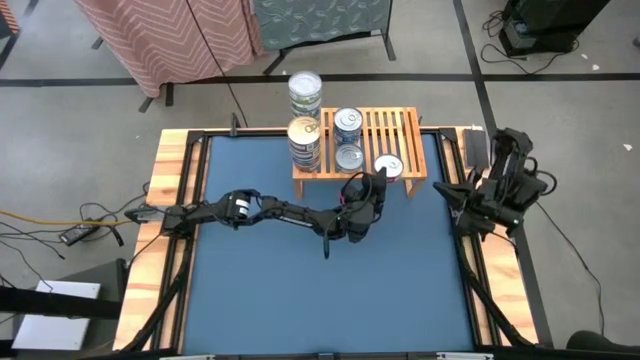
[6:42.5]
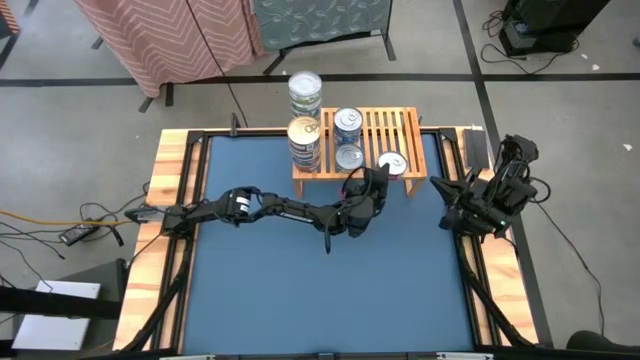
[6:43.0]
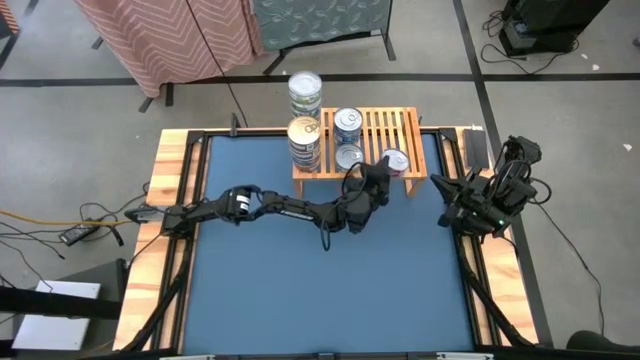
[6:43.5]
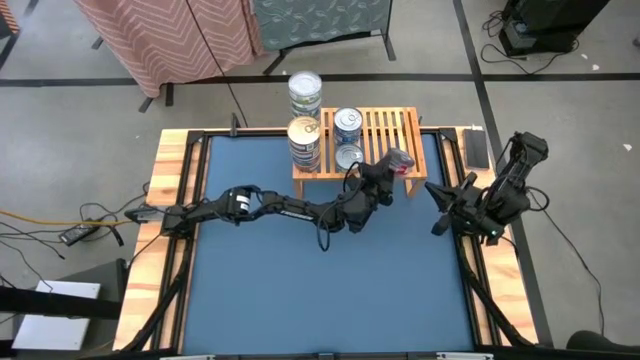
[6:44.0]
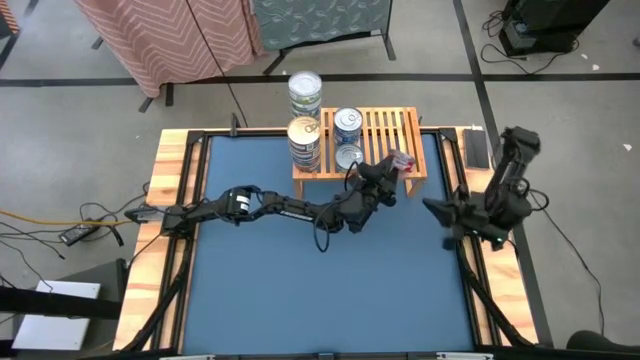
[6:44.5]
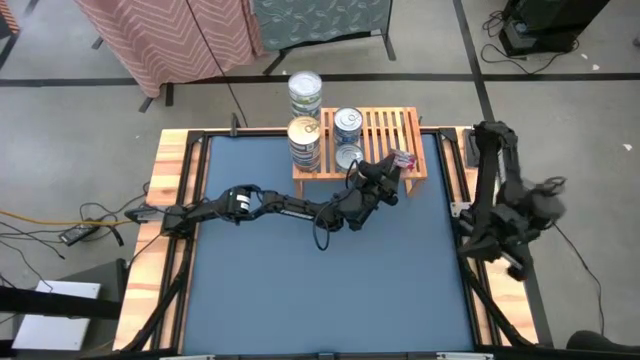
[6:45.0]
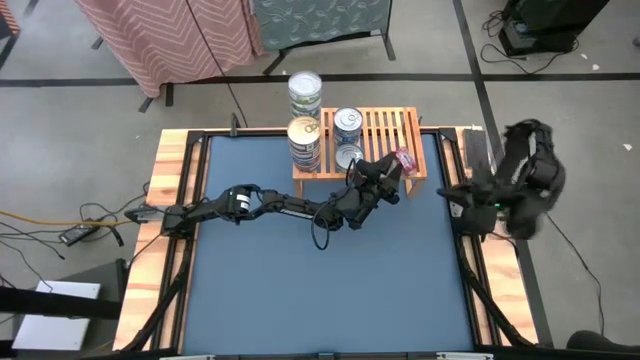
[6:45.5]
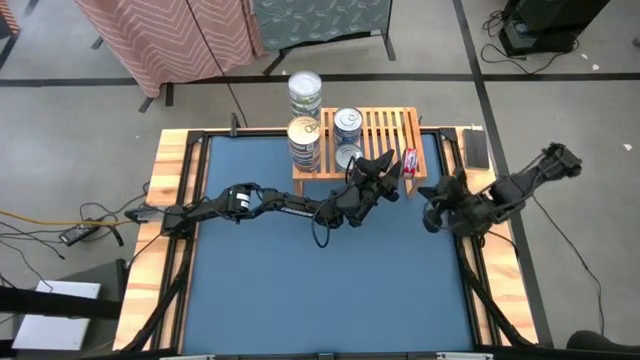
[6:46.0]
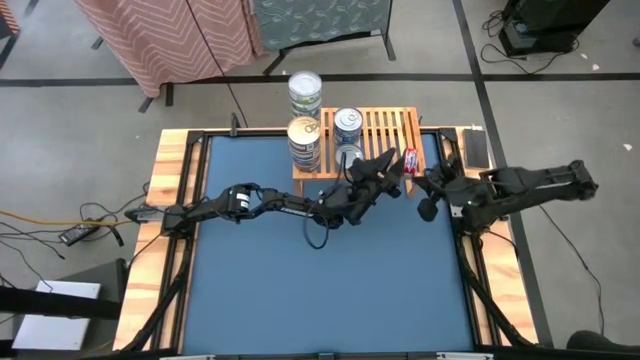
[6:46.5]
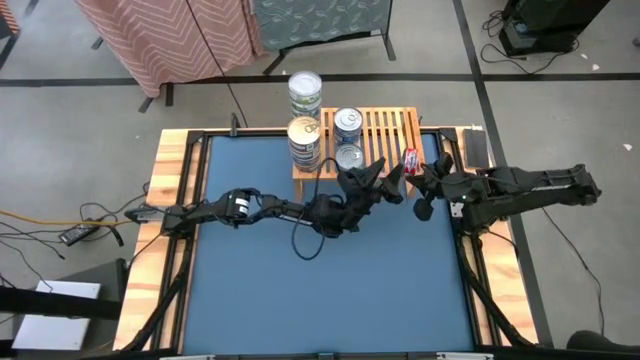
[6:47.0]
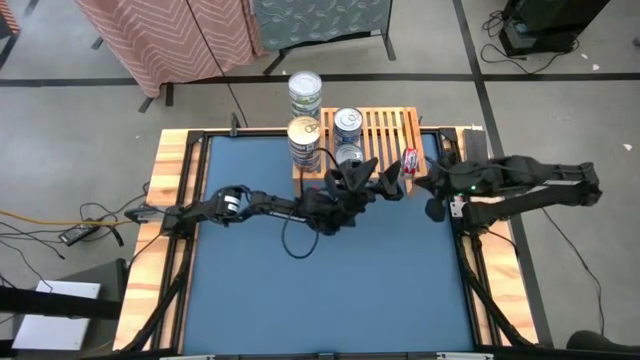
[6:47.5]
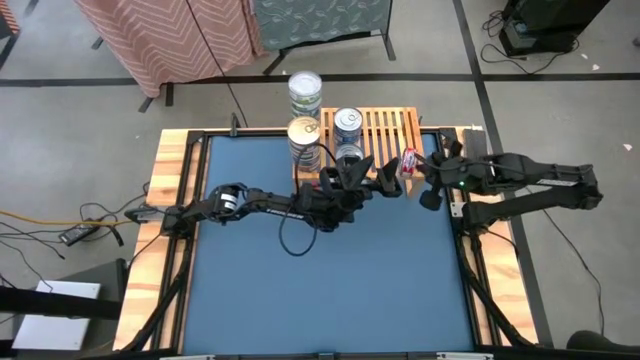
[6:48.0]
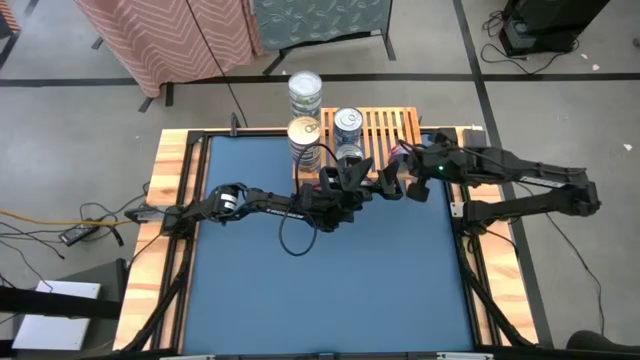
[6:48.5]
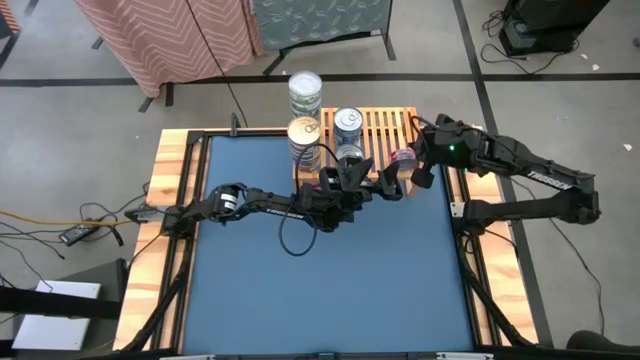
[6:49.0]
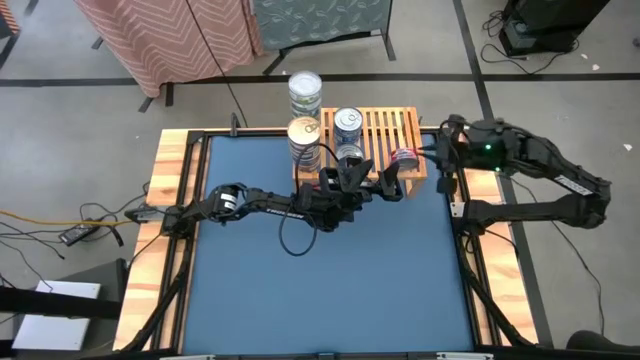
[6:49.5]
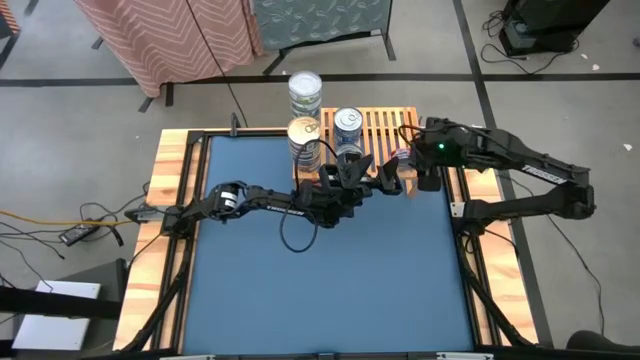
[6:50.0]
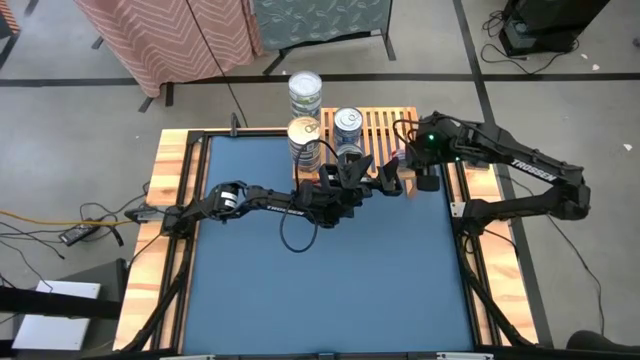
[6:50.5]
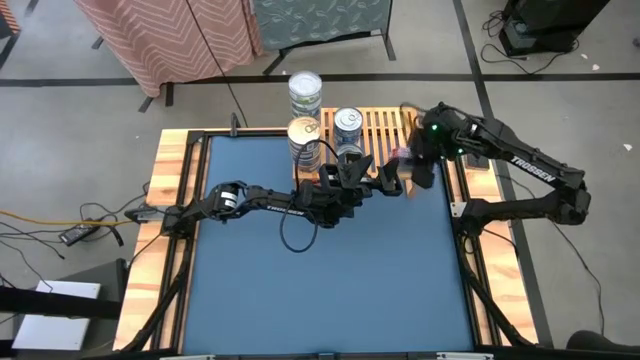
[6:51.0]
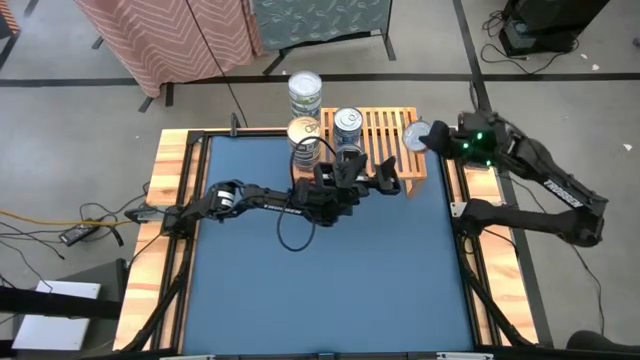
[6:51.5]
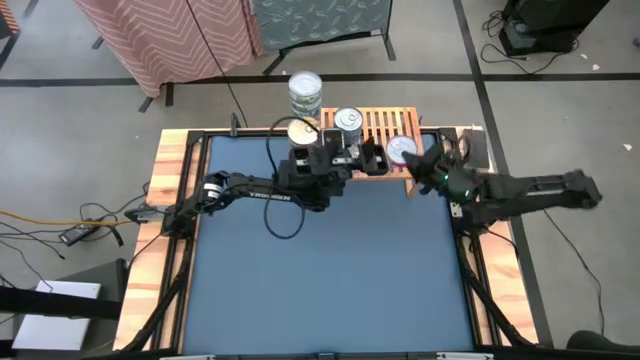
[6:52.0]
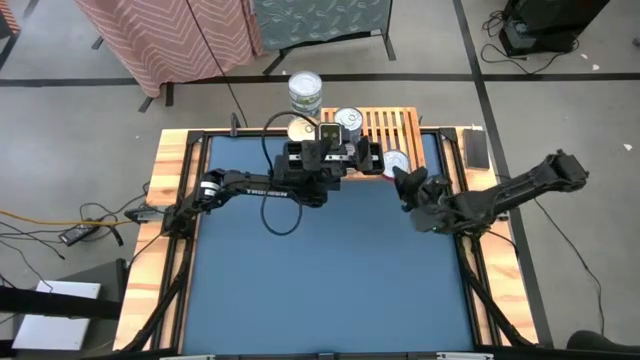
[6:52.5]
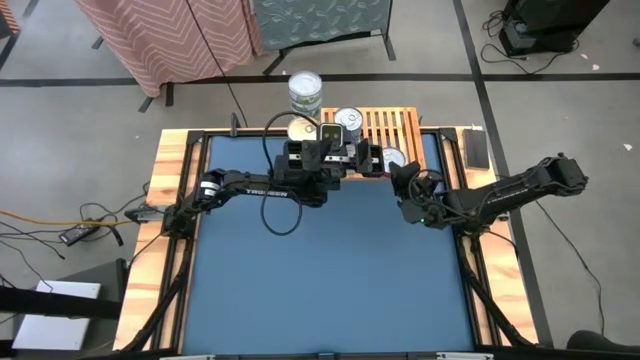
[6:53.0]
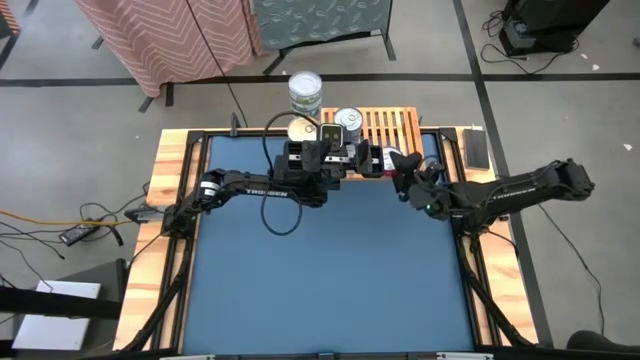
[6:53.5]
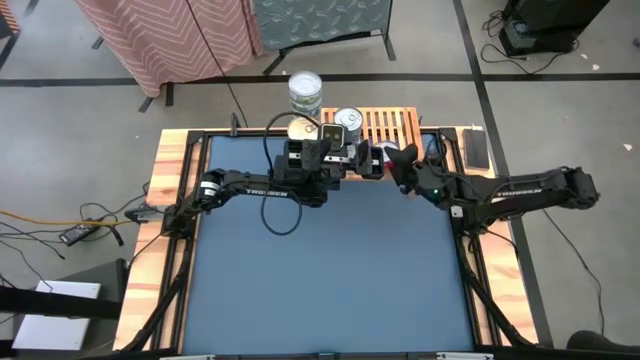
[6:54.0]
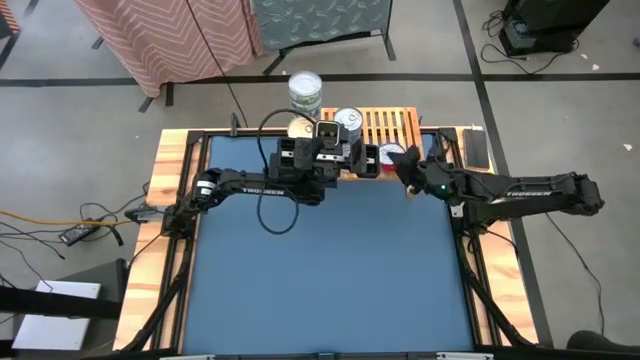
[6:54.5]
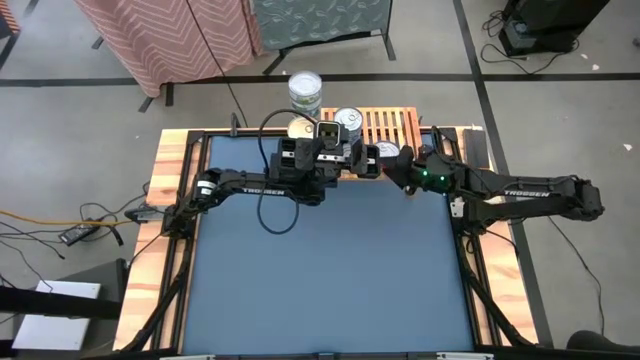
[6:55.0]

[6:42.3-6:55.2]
Task: Stack canned seafood by type on shelf
Put the red tuna can on the shelf

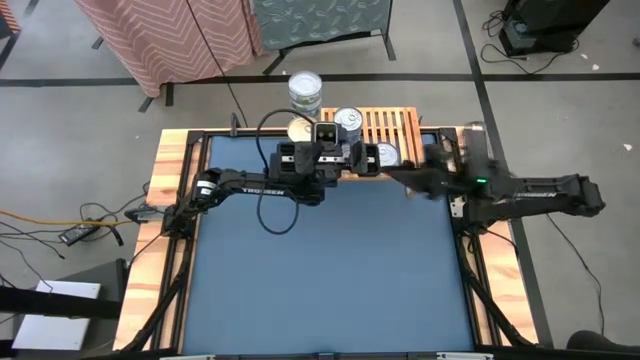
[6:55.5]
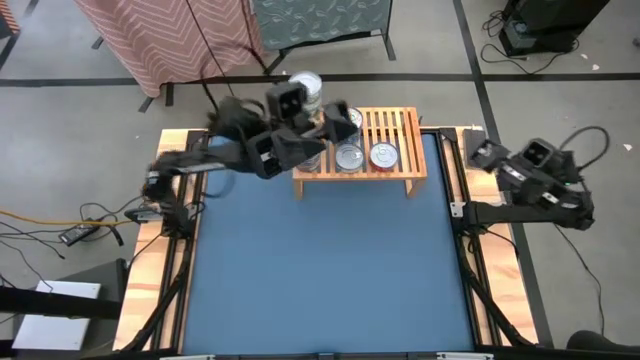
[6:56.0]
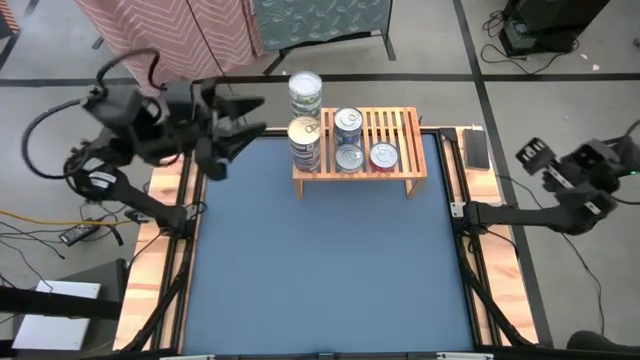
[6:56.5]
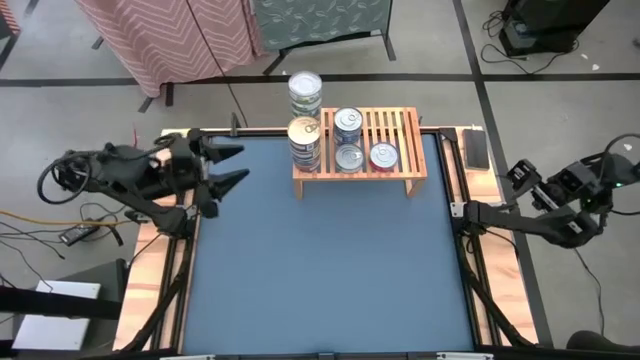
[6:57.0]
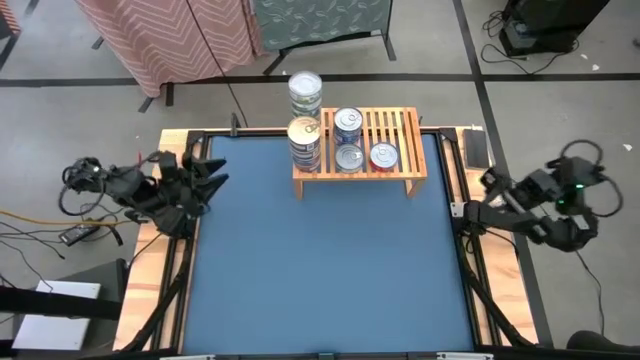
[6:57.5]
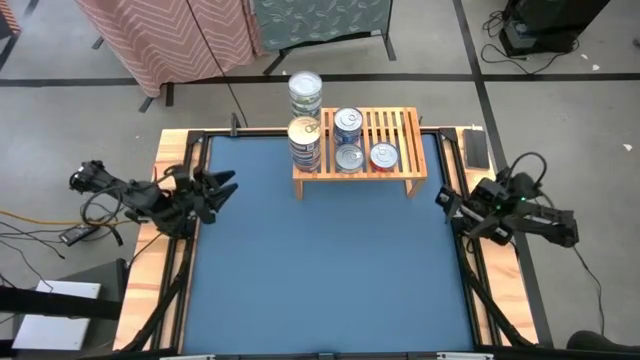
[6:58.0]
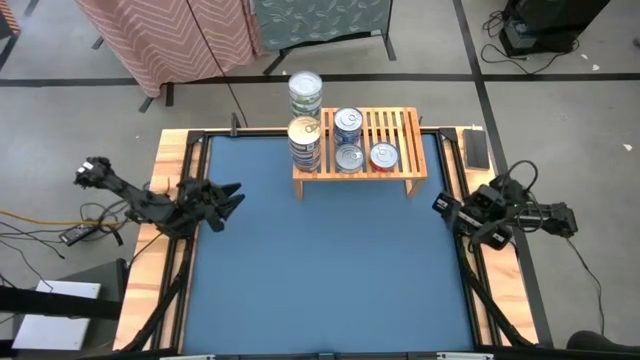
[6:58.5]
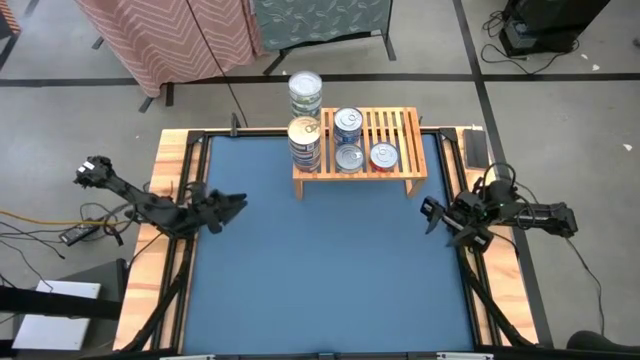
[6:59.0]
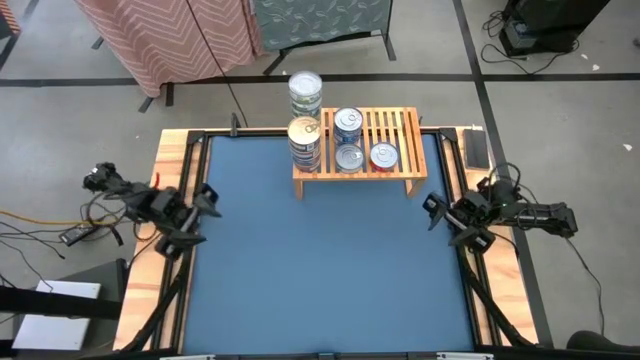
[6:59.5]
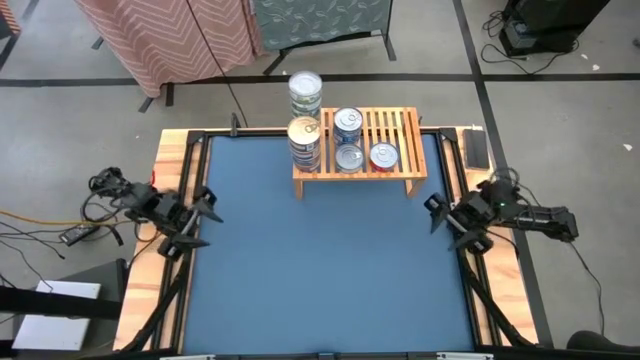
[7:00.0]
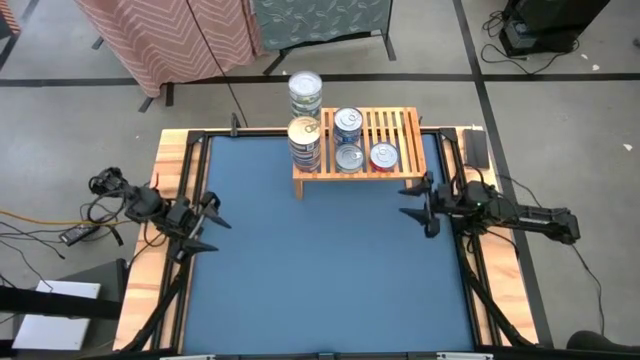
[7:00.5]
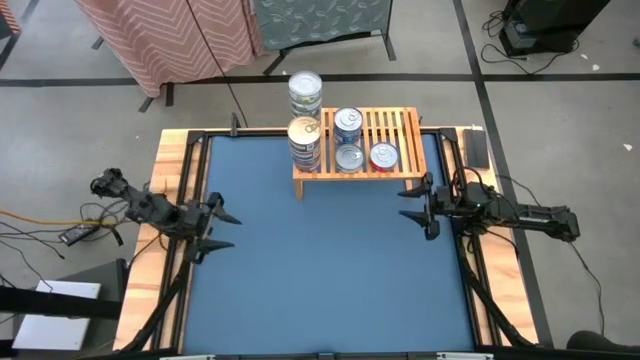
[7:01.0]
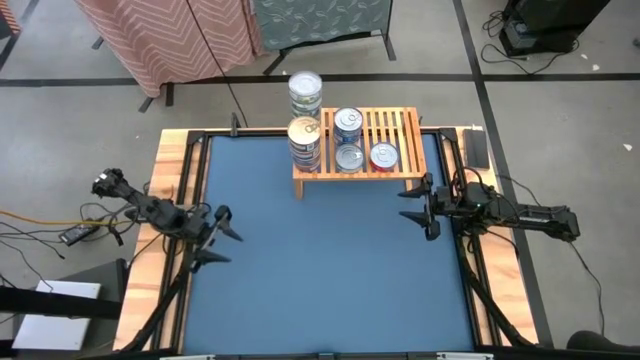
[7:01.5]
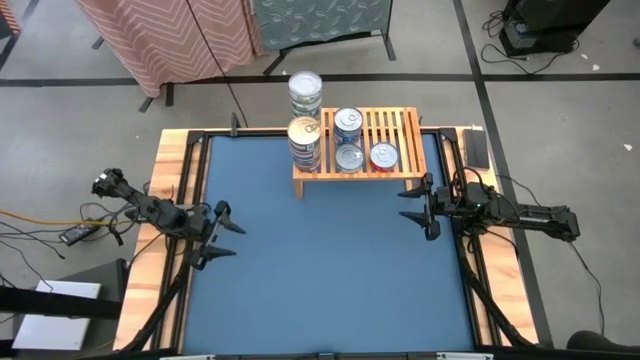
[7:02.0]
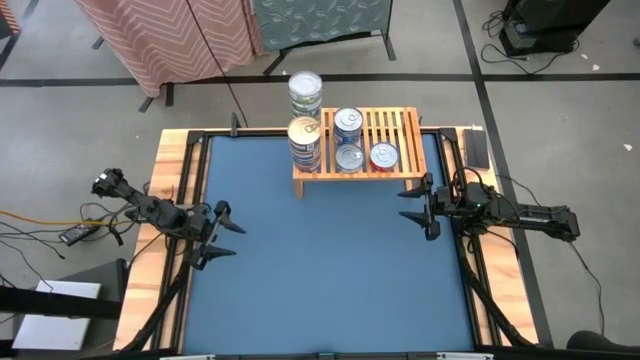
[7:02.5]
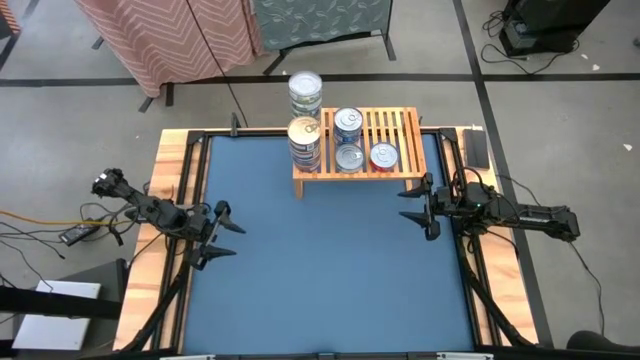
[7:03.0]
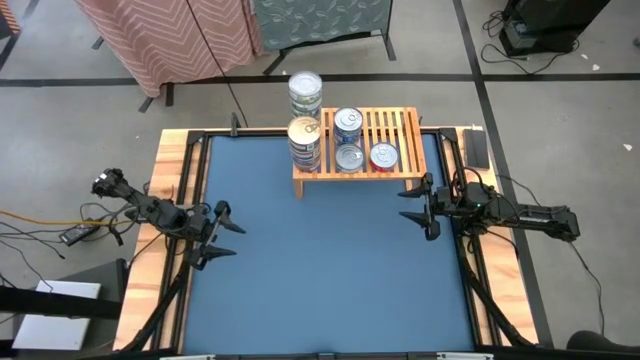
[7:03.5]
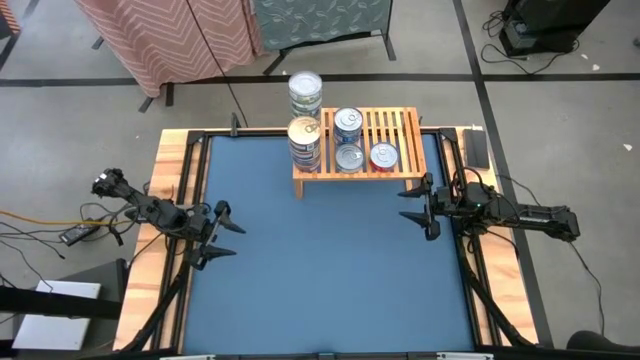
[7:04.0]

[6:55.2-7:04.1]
Return to Home Position
